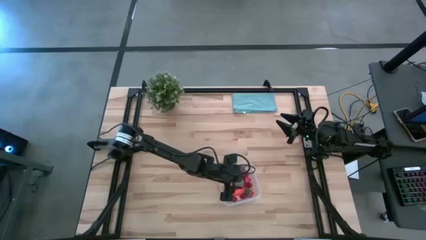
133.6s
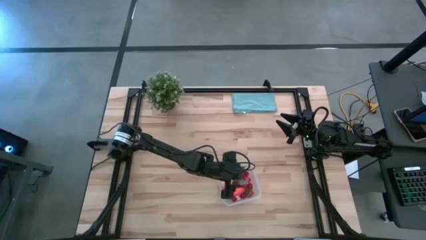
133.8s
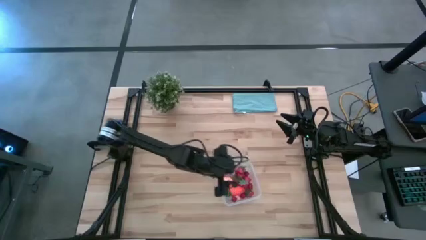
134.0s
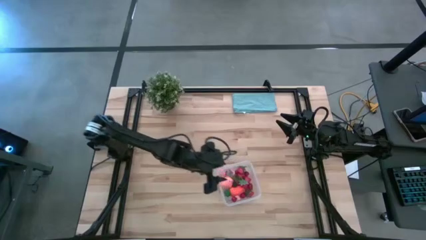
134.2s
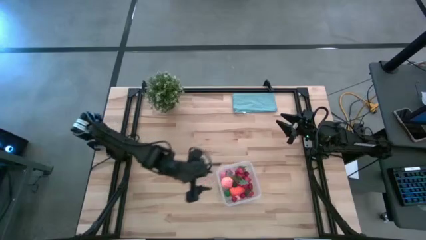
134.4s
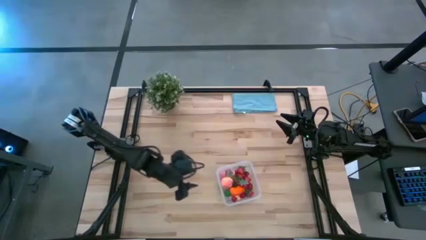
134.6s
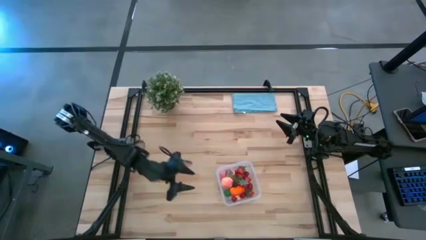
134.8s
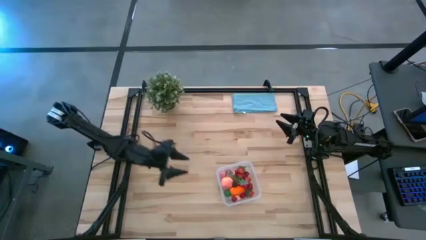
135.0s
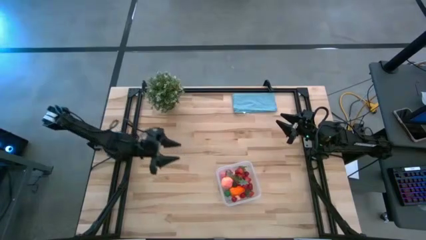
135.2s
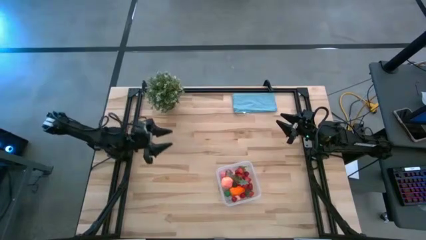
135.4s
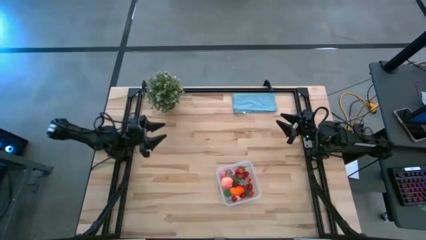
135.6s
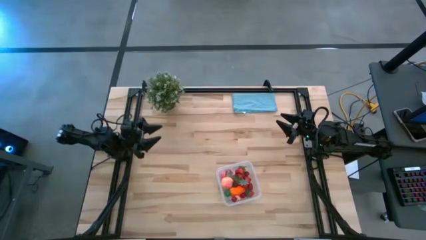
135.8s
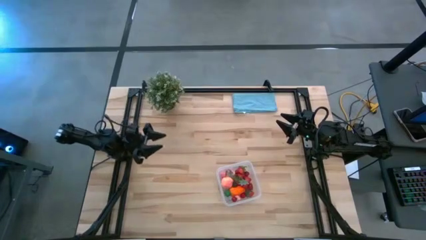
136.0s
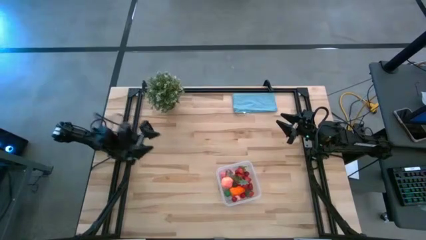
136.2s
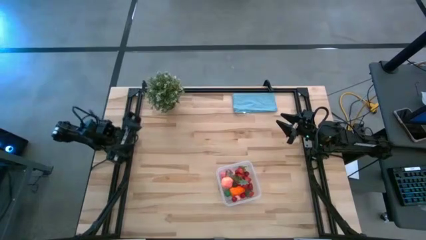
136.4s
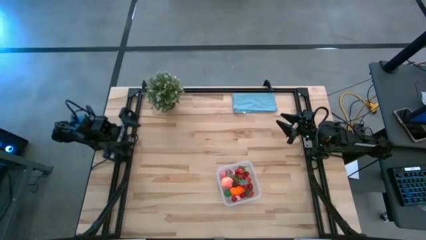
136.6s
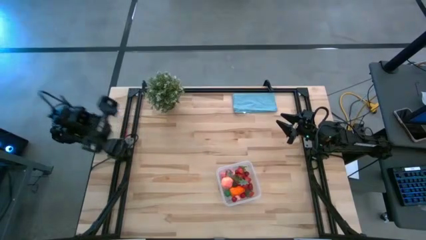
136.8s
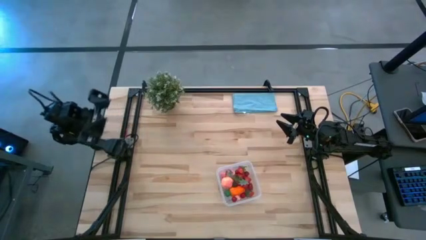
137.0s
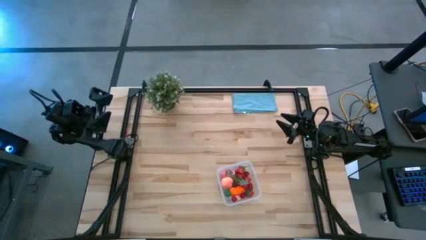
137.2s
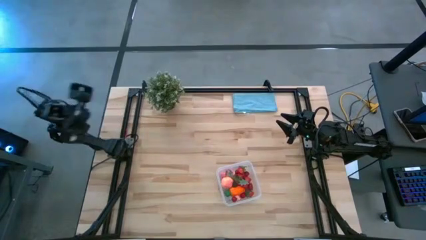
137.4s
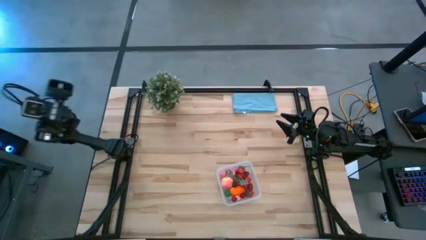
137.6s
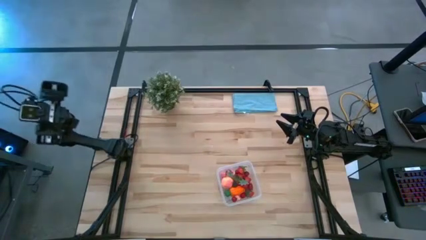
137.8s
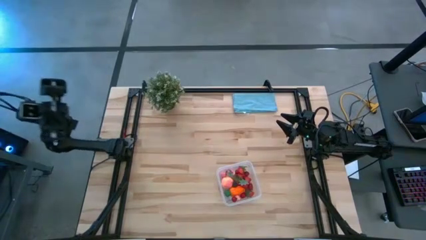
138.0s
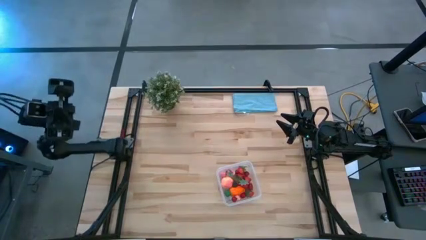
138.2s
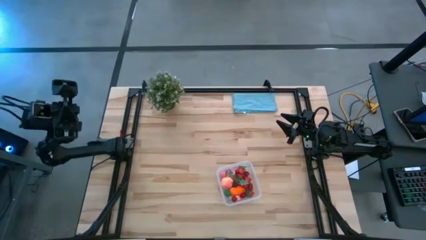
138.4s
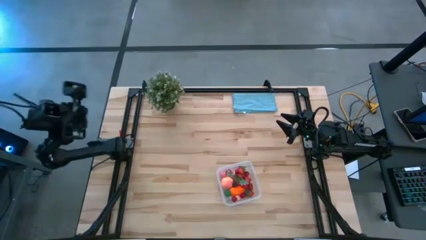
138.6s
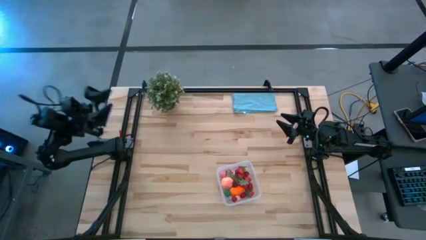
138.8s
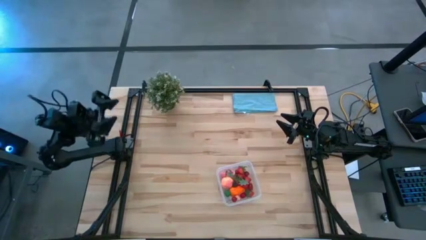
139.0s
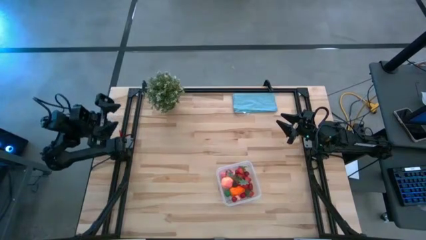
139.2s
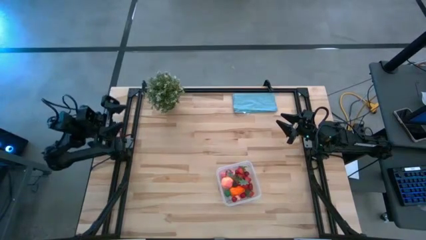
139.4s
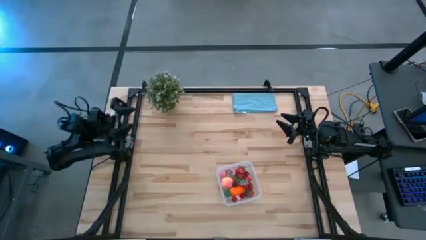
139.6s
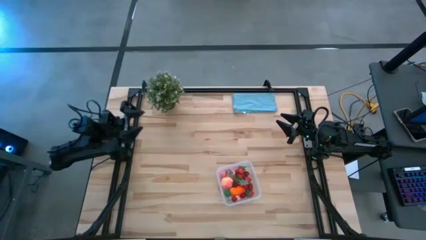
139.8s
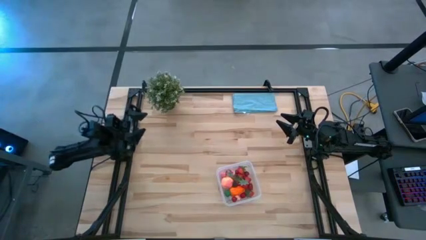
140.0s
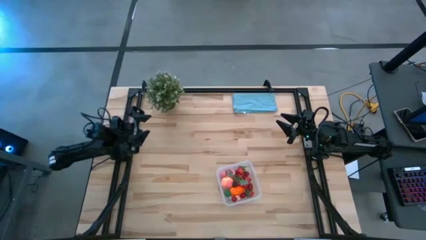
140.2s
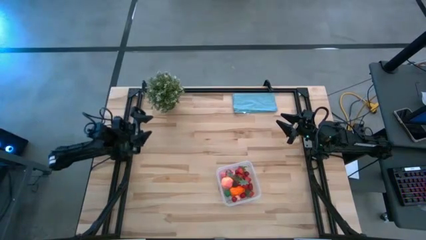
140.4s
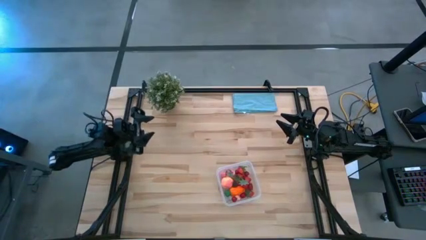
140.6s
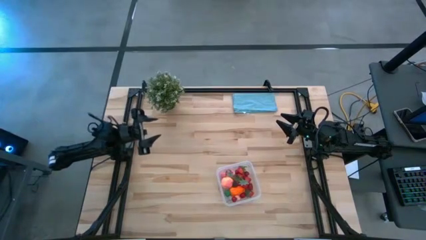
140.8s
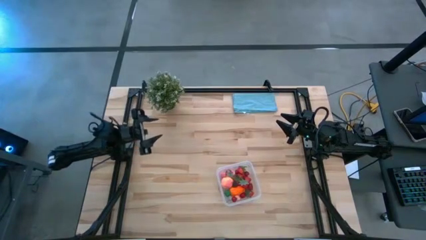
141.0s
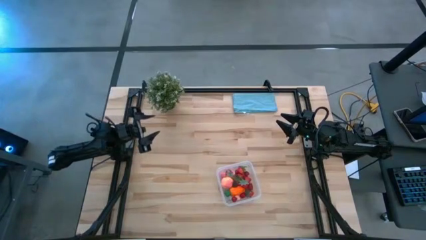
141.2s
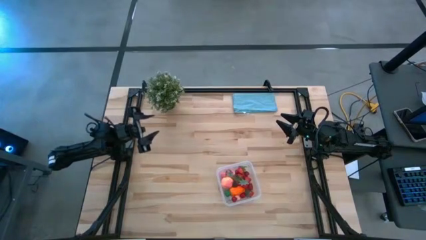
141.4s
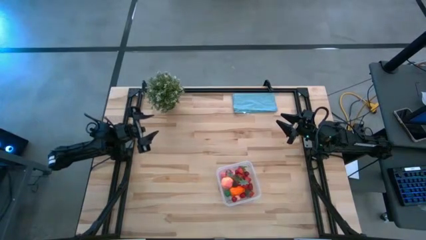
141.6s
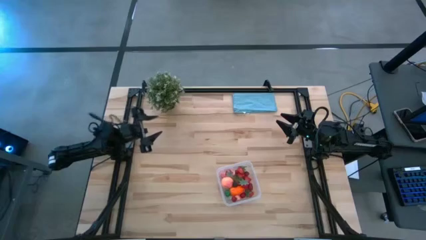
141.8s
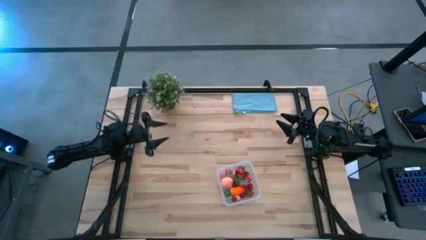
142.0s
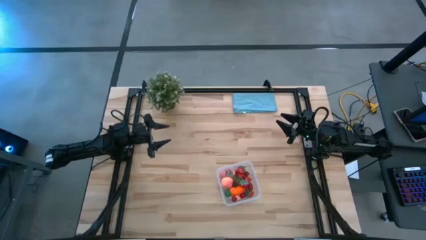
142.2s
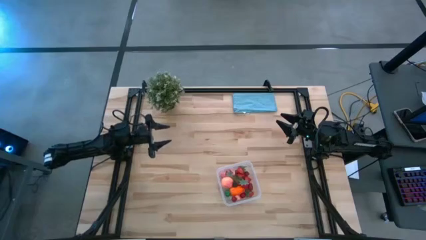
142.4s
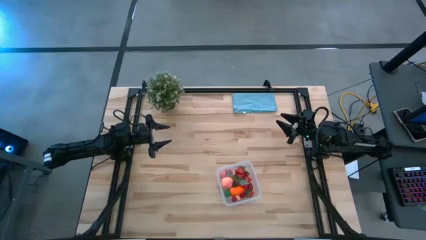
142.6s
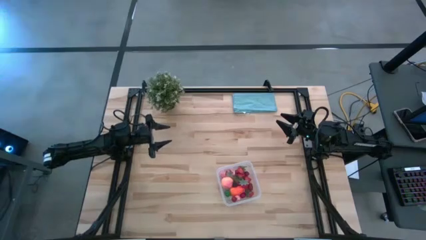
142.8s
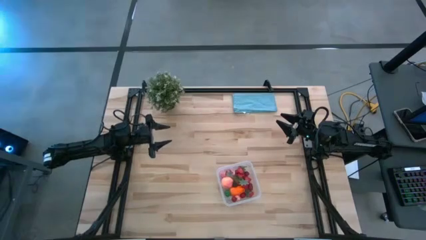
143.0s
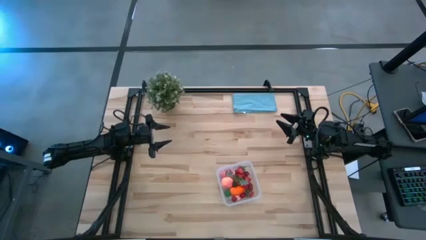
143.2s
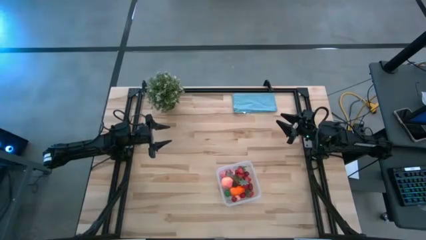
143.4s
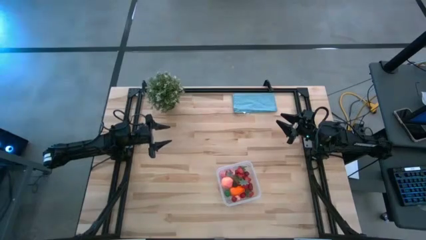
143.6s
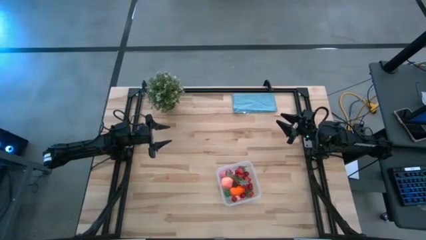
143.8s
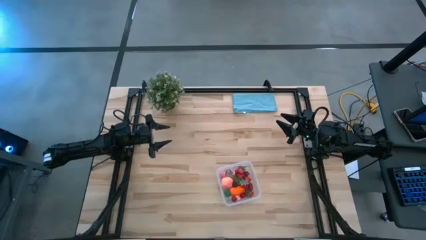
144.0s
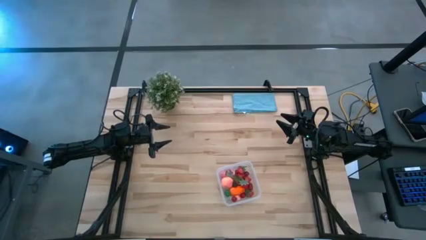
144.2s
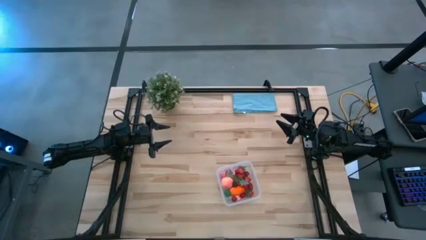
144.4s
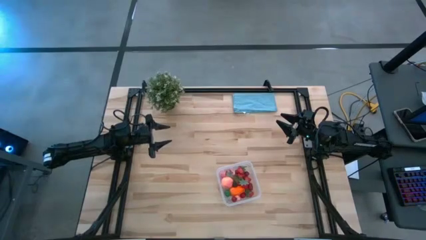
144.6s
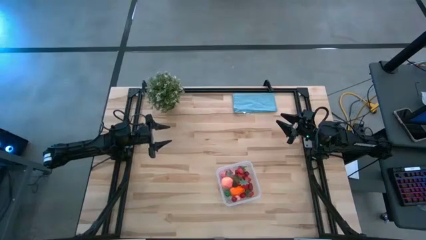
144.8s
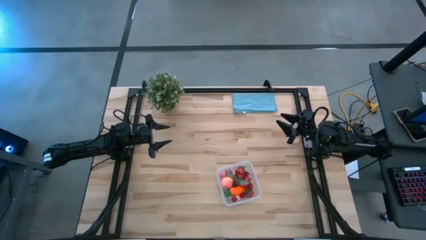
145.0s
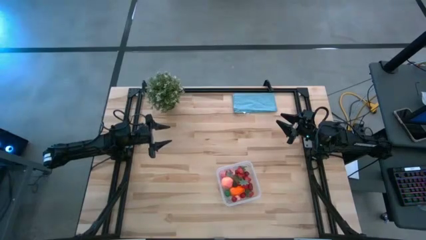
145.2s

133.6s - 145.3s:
Task: Pick and placing Produce into tupperware
Return to Home Position

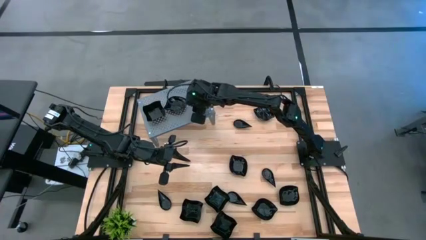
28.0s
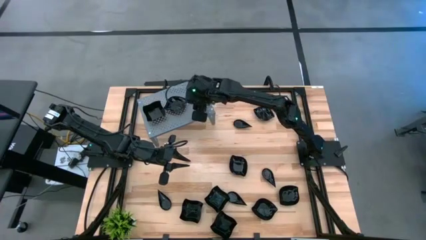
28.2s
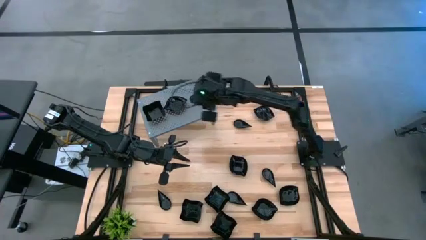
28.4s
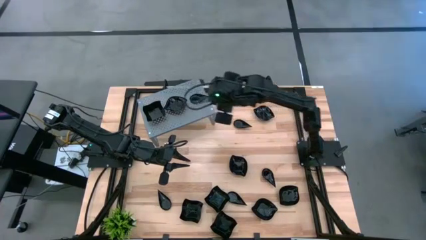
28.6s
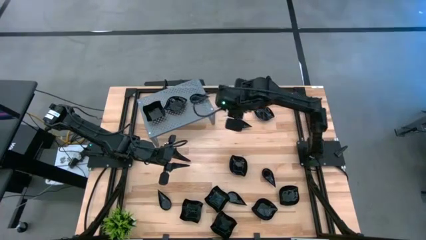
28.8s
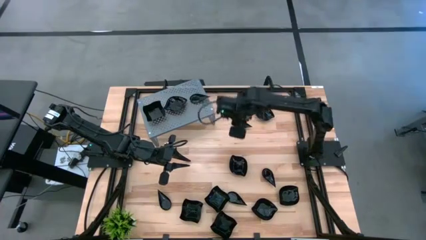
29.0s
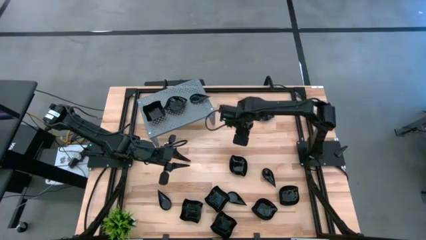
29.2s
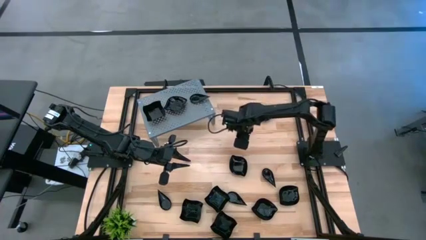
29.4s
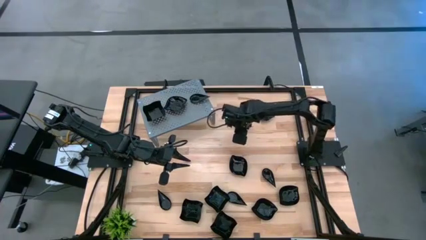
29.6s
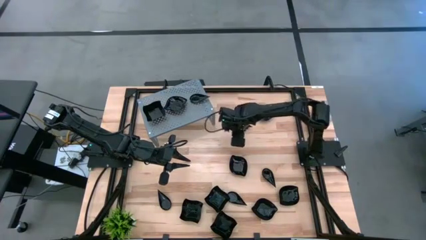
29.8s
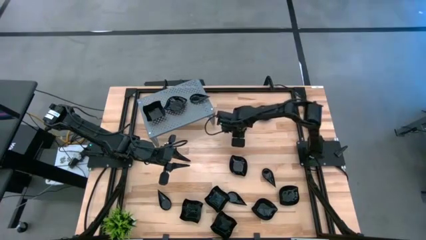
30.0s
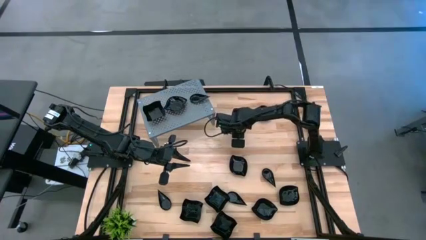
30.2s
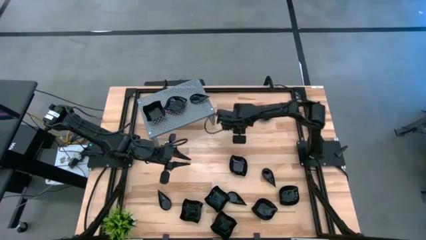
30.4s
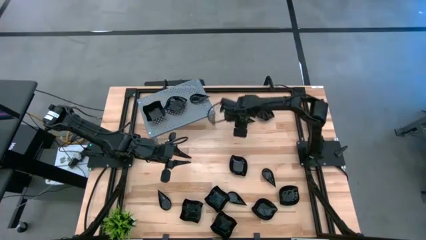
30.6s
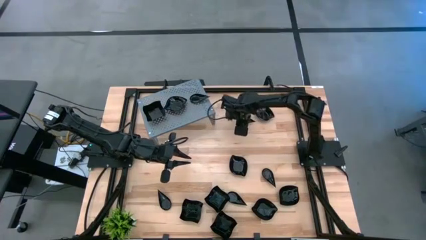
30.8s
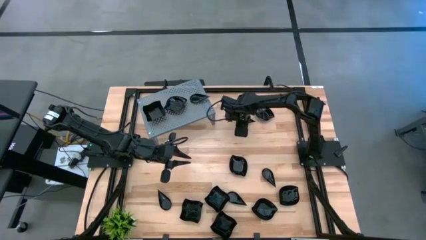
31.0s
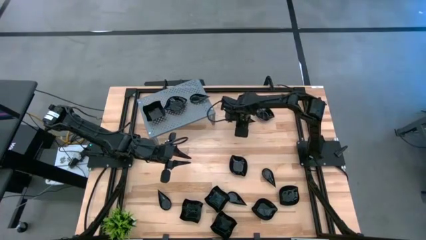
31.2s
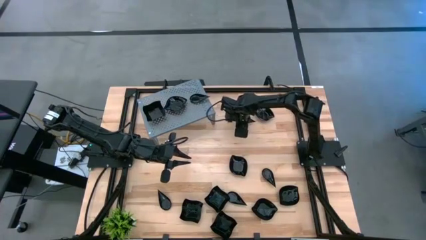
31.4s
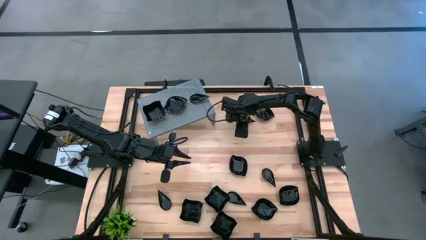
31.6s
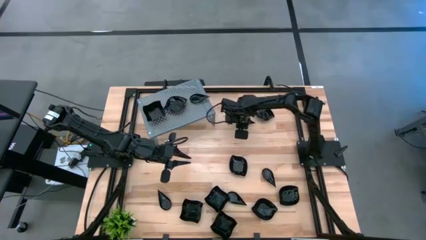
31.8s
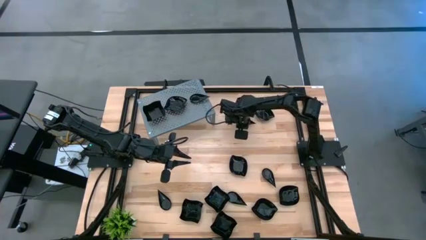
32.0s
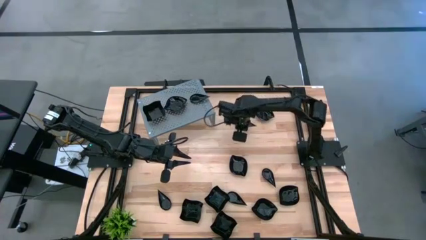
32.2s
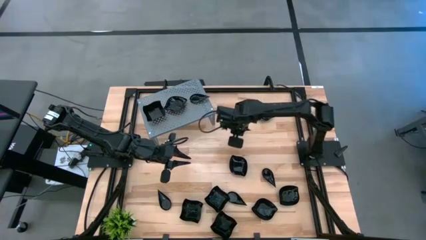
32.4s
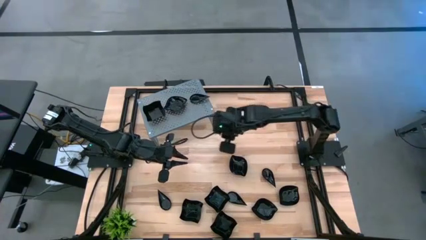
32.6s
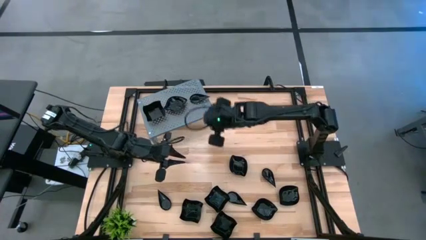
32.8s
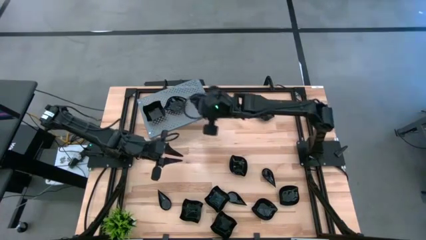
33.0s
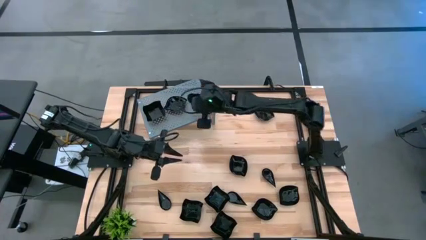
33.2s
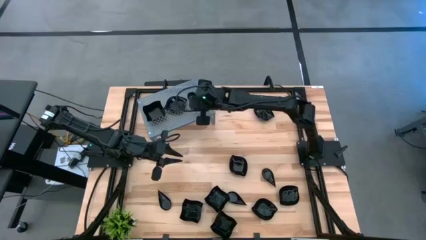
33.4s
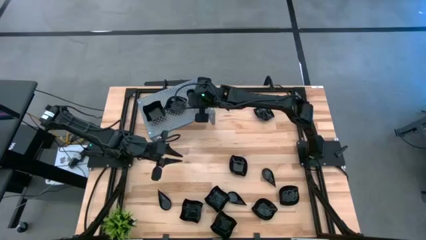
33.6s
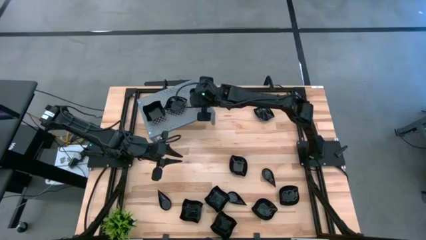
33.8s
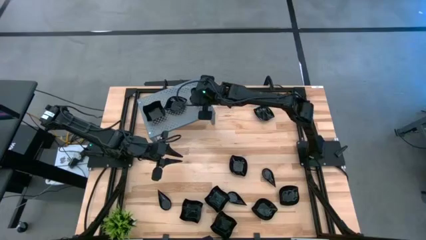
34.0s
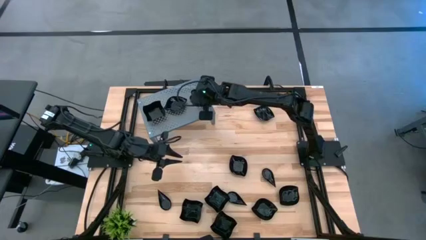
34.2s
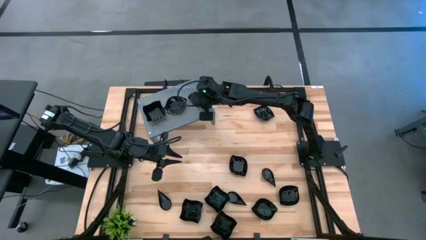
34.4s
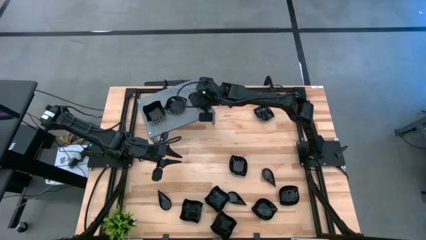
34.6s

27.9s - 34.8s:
Task: Pick & Place Mini shaped plates
Stack the black drop shaped plate on top of the black drop shaped plate on the shelf
